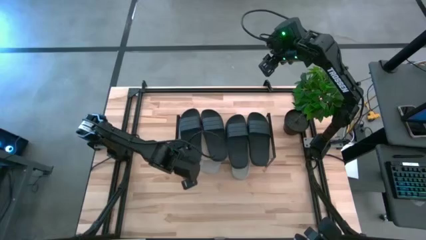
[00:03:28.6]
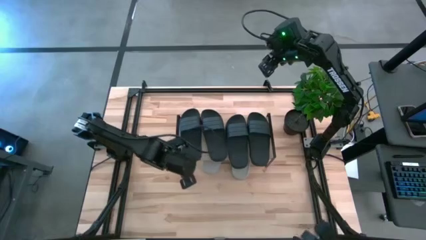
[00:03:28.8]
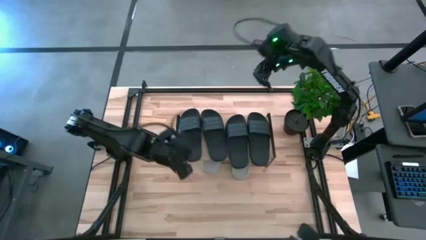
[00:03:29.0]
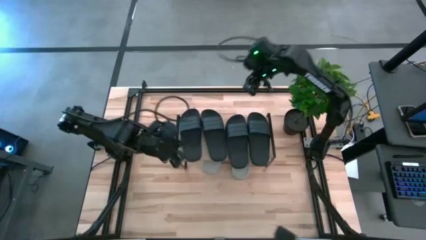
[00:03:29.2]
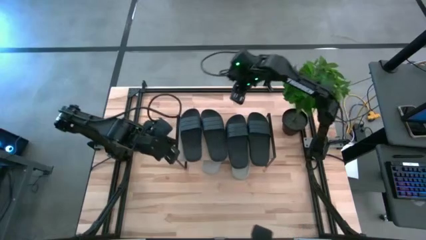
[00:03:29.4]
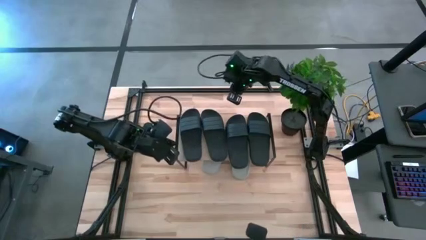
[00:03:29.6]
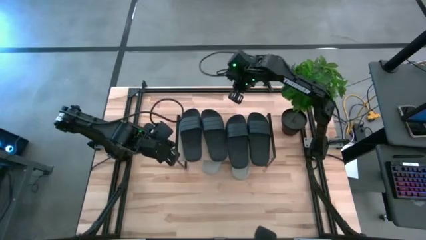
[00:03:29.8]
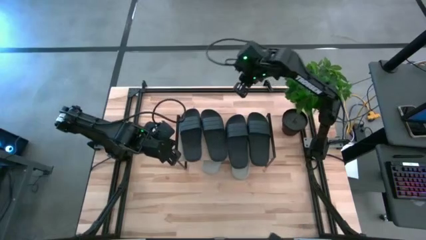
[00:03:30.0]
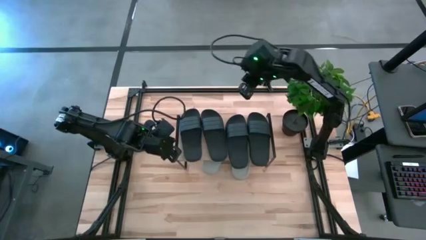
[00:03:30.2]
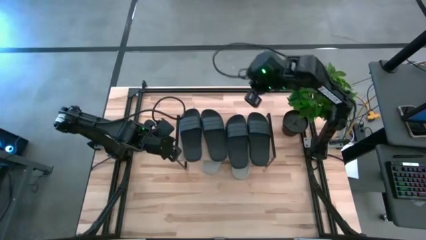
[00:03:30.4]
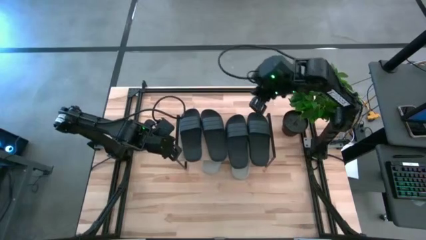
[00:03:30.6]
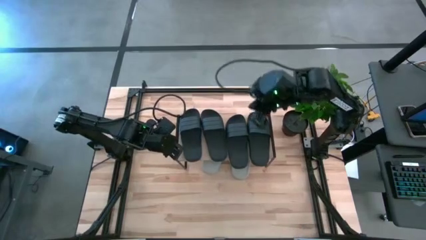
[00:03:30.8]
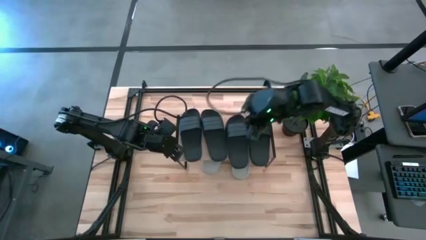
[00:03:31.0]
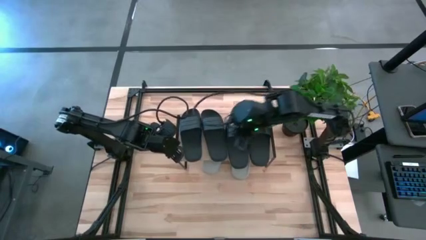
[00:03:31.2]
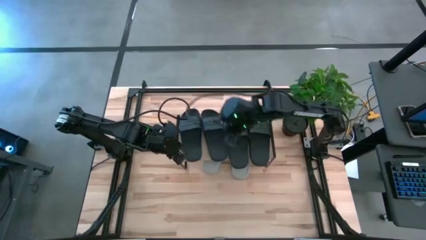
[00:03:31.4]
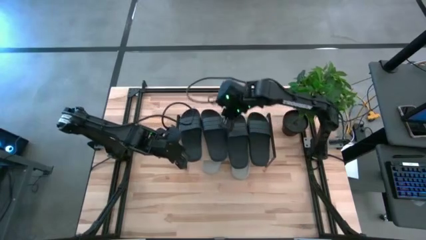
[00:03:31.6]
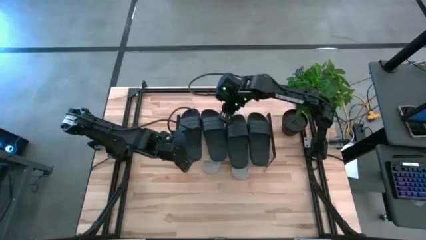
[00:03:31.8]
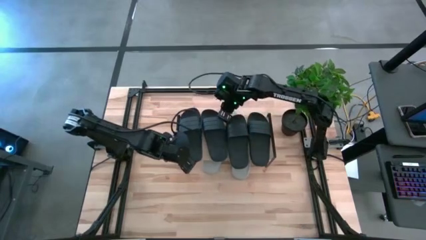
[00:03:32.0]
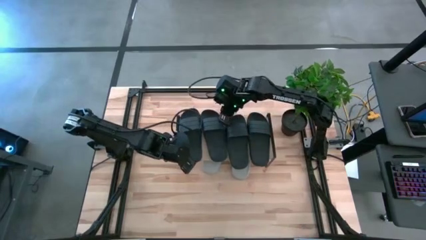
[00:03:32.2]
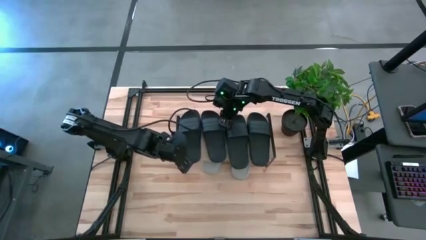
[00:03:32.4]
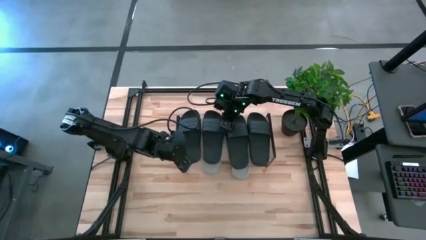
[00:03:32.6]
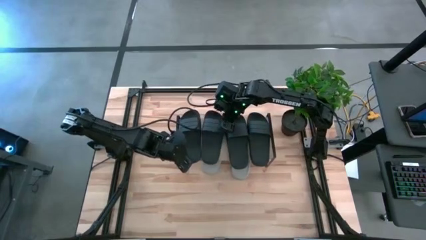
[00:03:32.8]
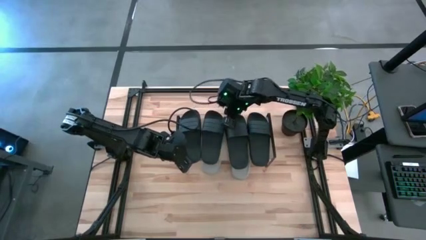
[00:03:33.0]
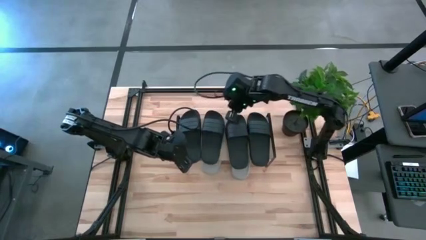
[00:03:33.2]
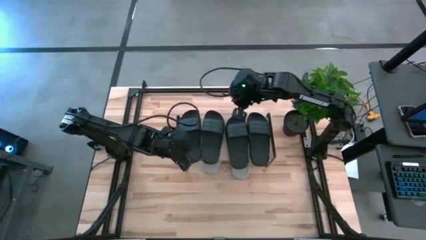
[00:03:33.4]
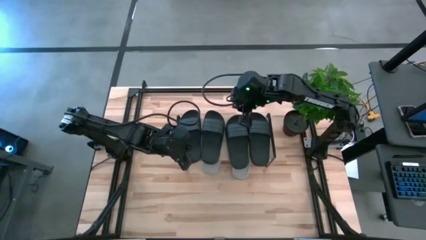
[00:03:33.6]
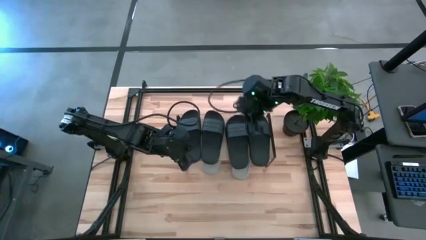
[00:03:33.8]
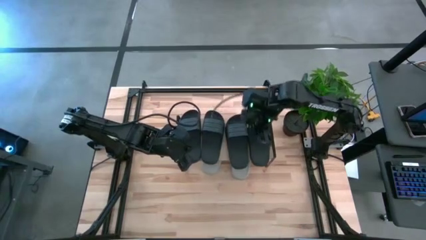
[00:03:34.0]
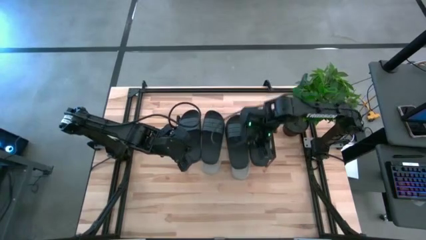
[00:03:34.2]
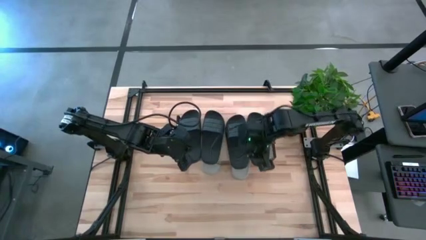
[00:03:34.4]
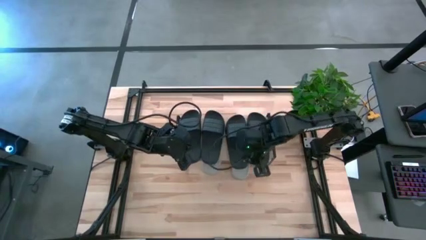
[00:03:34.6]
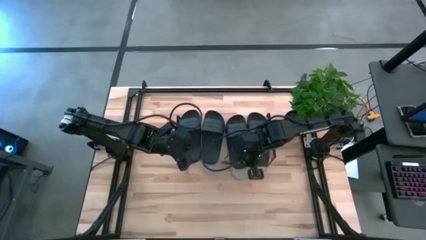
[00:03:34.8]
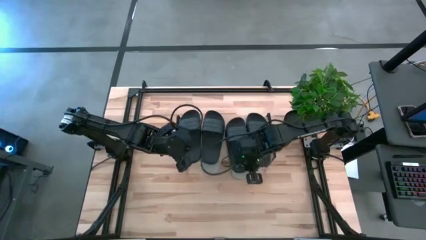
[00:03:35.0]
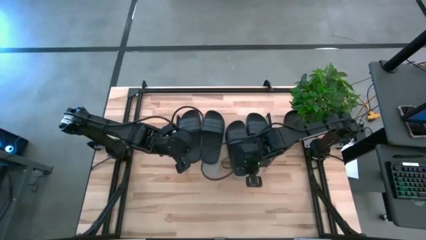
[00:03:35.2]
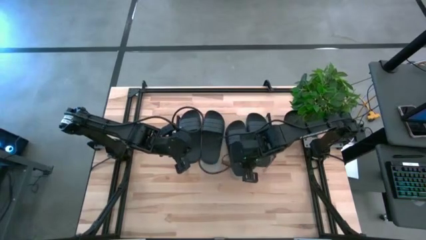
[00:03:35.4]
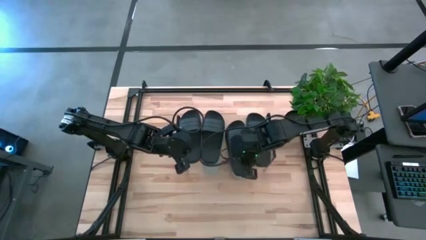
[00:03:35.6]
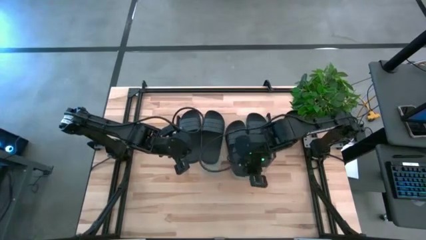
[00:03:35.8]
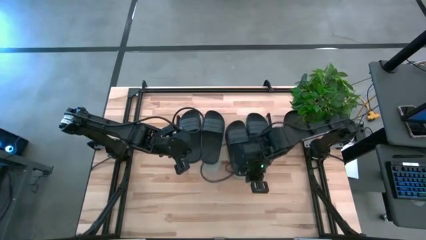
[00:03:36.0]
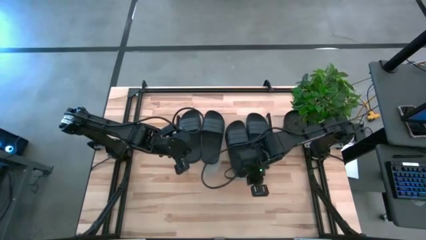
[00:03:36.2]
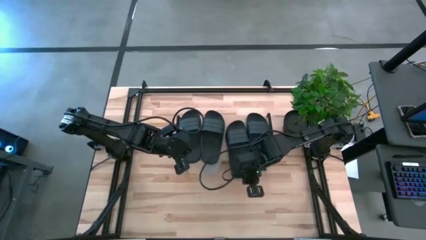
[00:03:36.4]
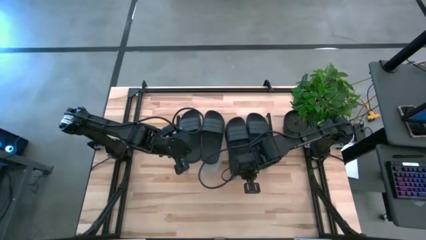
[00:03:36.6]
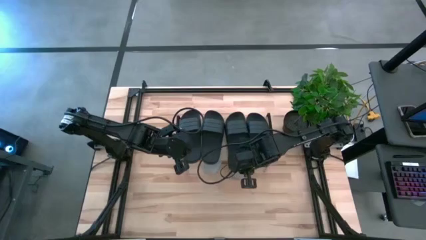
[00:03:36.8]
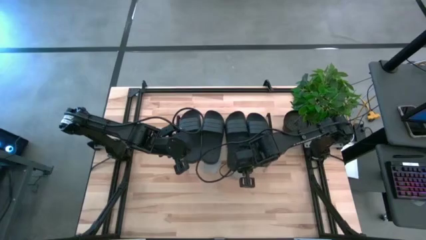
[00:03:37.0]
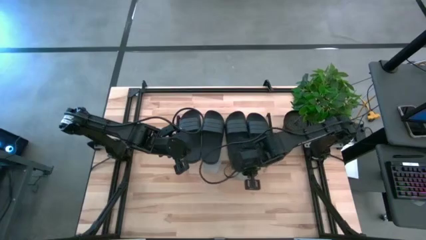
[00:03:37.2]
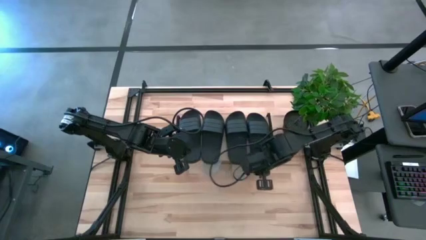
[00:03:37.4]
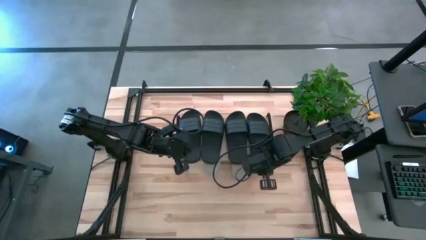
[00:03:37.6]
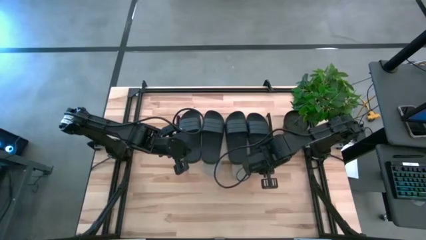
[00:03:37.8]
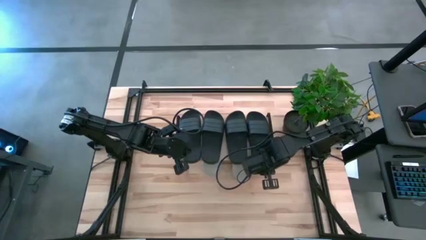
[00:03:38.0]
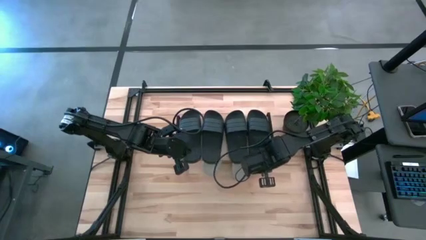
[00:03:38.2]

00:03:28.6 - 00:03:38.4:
Task: Pick and place slides into the shelf
Adjust the black slippers on the shelf

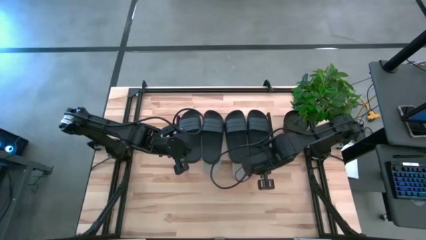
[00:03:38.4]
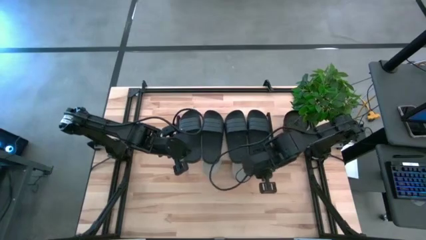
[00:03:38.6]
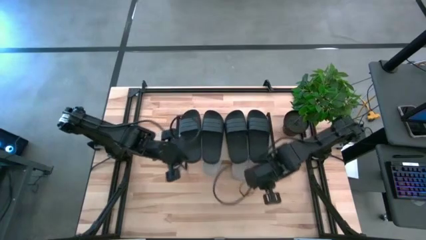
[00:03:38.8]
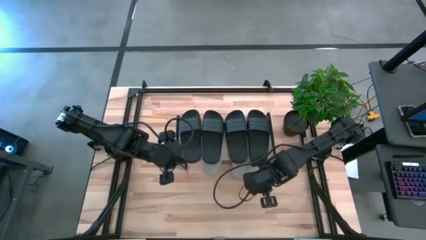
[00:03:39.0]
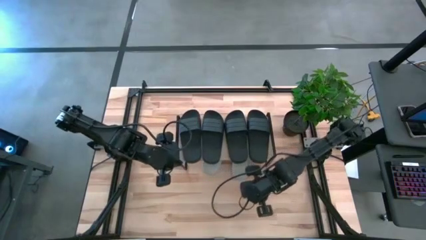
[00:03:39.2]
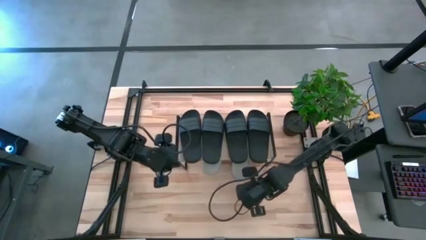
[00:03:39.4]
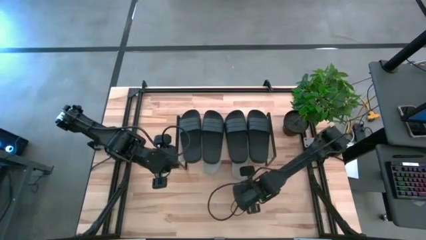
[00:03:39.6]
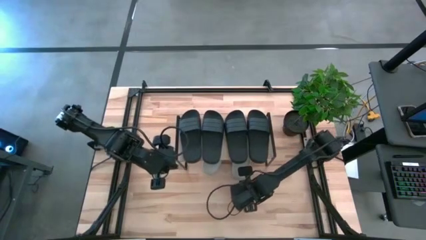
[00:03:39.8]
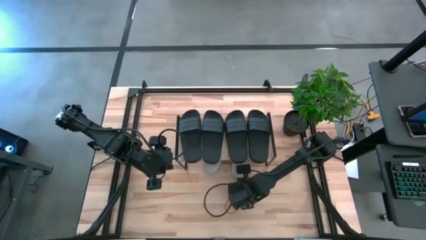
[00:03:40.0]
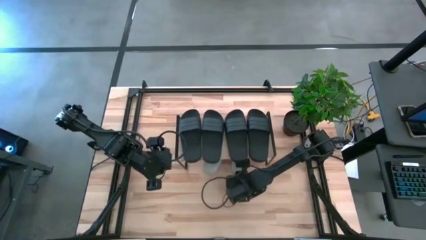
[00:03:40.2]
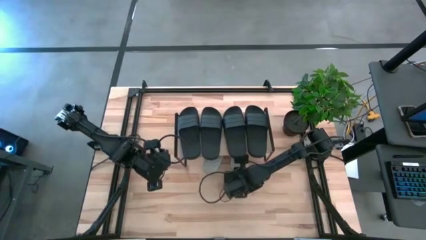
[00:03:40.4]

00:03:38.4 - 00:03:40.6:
Adjust the gray slipper under the shelf

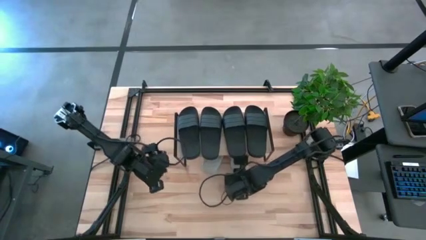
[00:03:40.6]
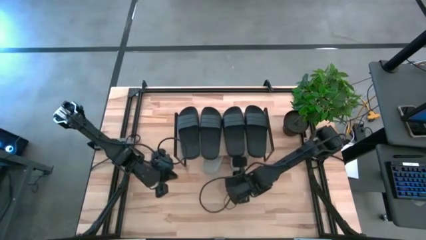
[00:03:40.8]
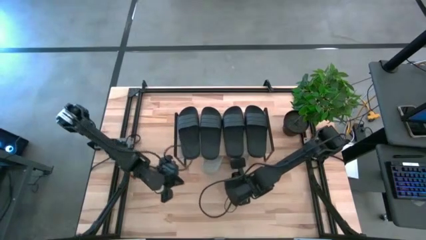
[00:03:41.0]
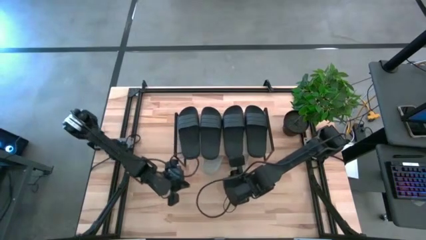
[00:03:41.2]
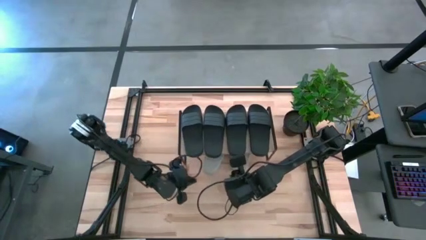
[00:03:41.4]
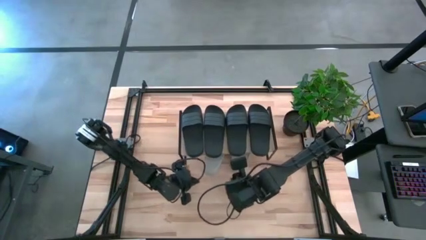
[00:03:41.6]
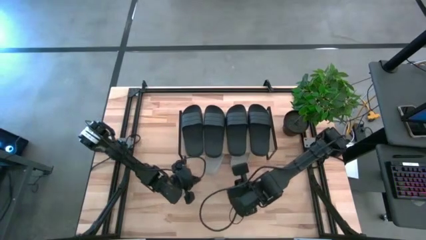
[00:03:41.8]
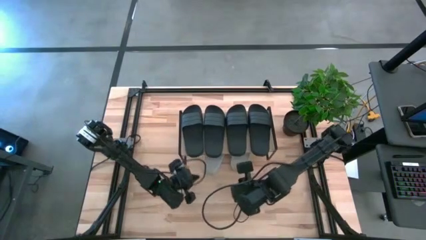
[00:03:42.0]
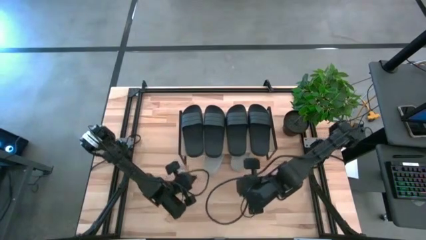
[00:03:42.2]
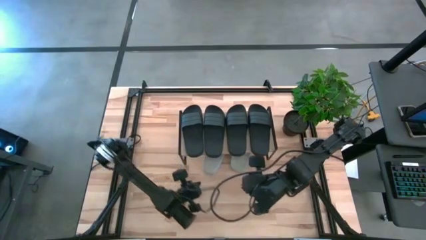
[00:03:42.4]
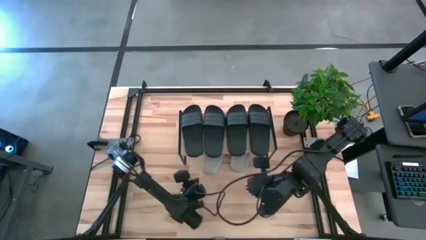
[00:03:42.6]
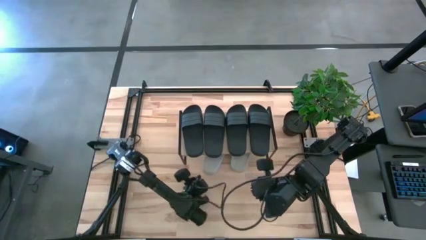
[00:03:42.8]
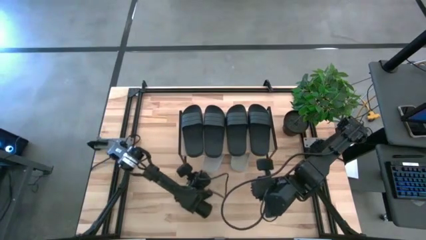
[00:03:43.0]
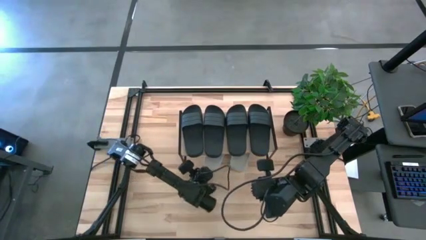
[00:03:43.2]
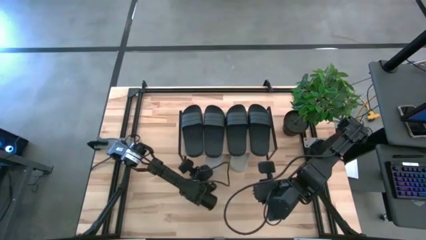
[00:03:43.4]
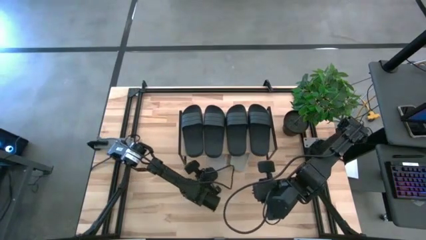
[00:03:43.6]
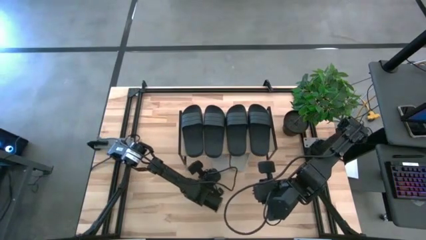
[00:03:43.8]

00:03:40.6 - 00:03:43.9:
Adjust the gray slipper under the shelf

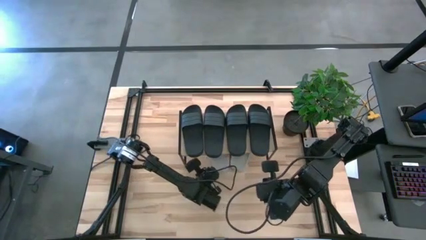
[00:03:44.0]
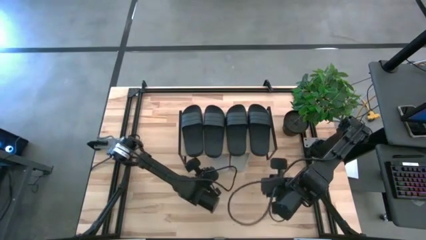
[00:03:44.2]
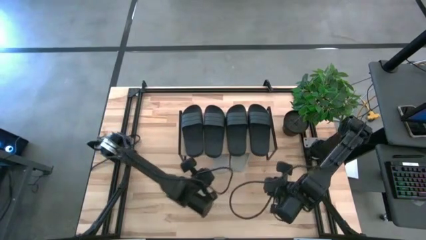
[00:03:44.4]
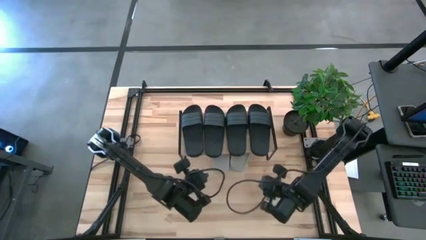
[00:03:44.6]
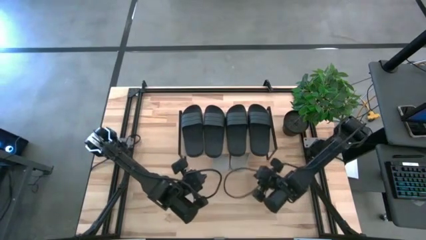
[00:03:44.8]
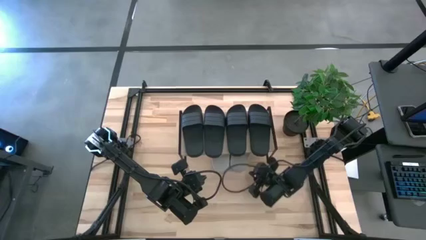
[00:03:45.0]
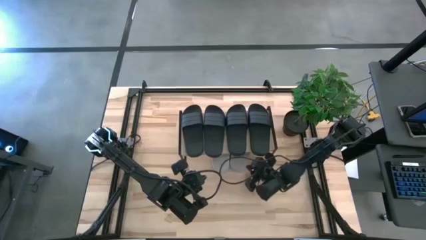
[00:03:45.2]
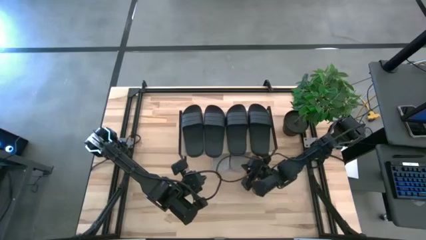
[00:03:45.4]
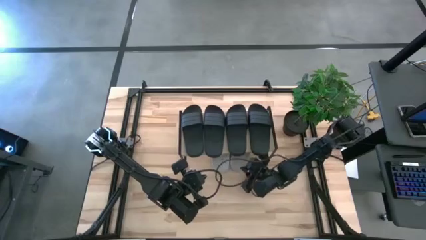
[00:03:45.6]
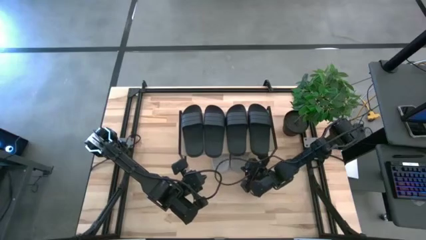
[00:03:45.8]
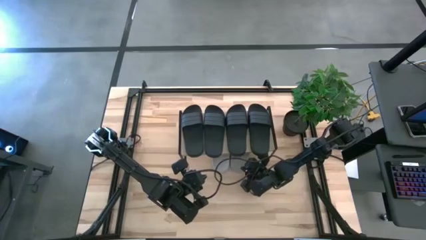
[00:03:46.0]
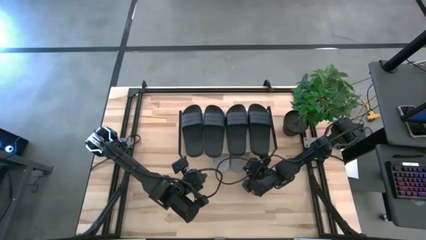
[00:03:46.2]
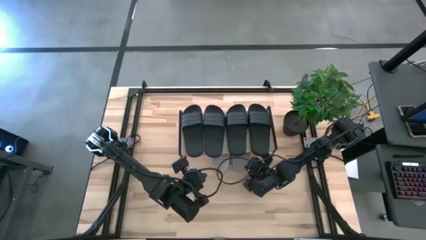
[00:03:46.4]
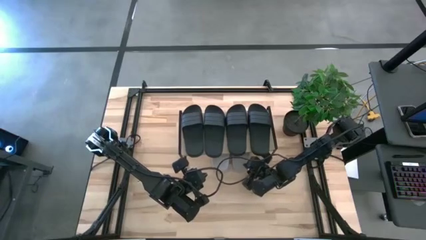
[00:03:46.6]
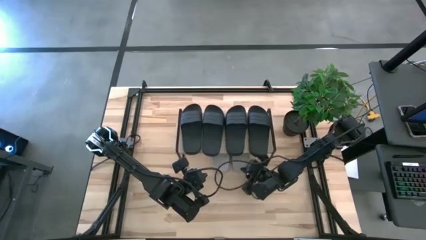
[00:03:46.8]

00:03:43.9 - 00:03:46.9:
Adjust the gray slipper under the shelf
